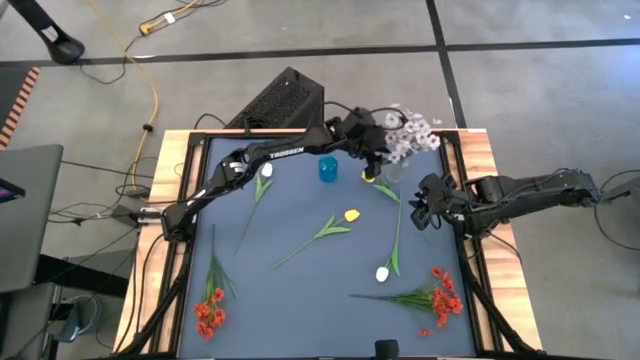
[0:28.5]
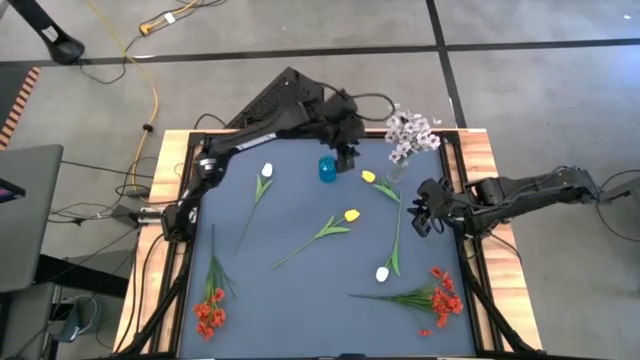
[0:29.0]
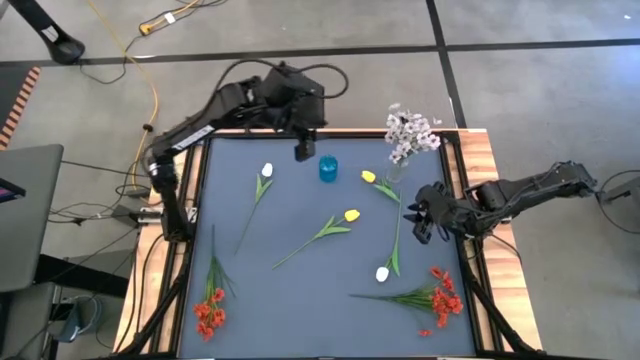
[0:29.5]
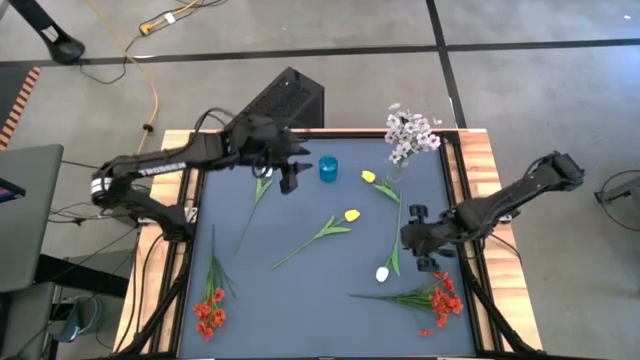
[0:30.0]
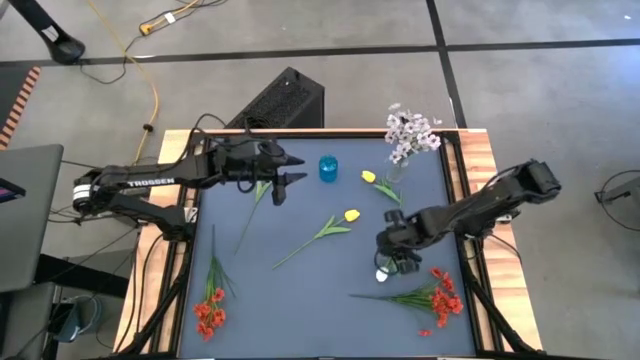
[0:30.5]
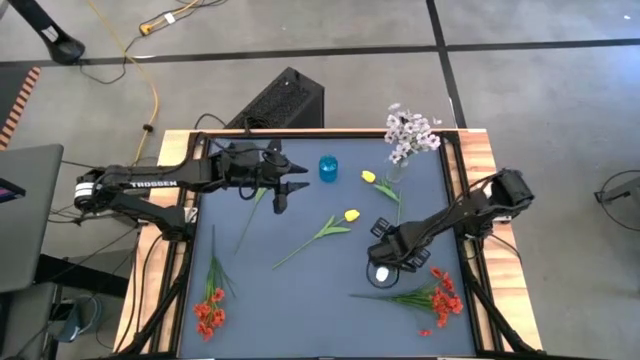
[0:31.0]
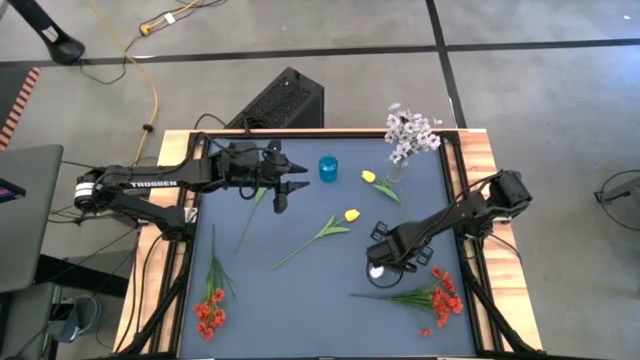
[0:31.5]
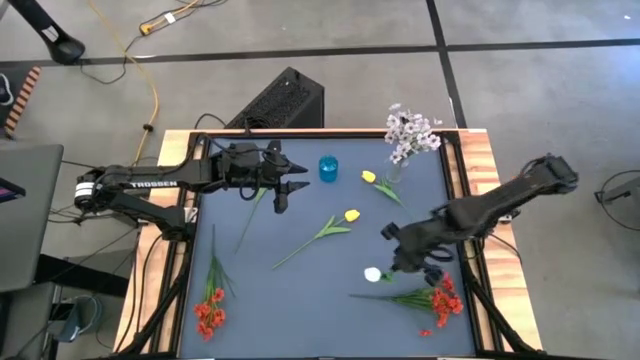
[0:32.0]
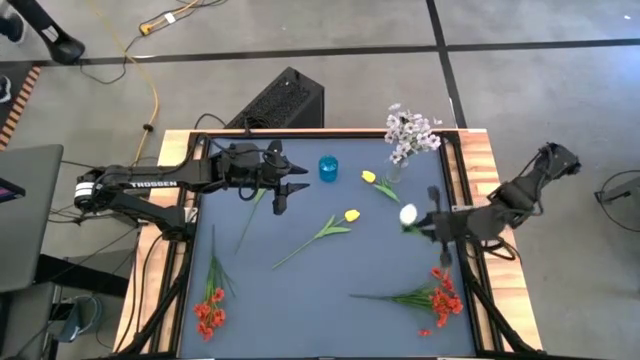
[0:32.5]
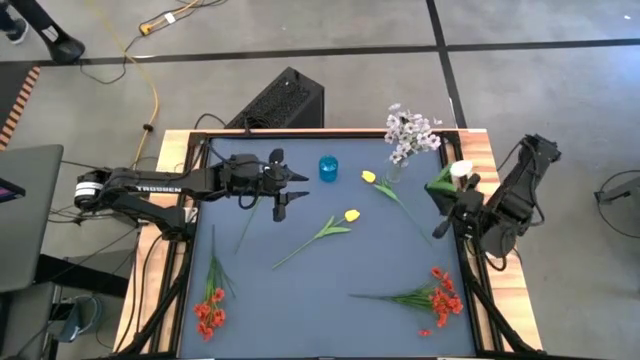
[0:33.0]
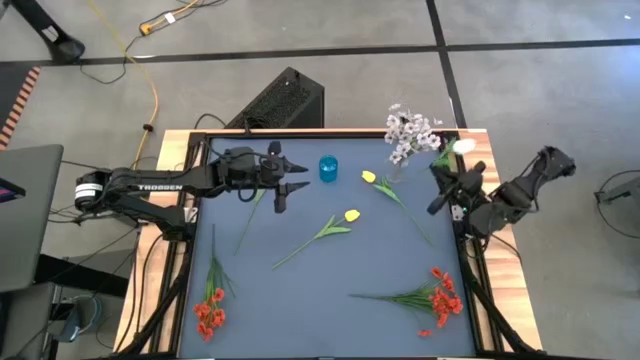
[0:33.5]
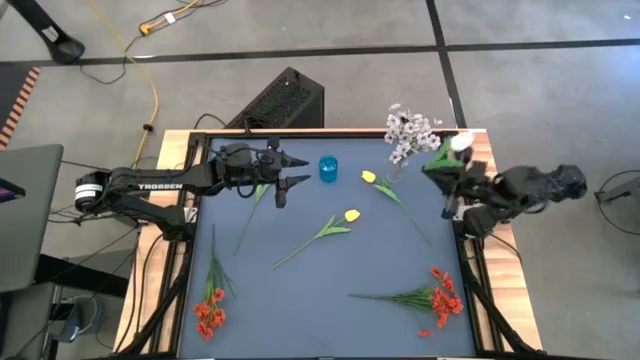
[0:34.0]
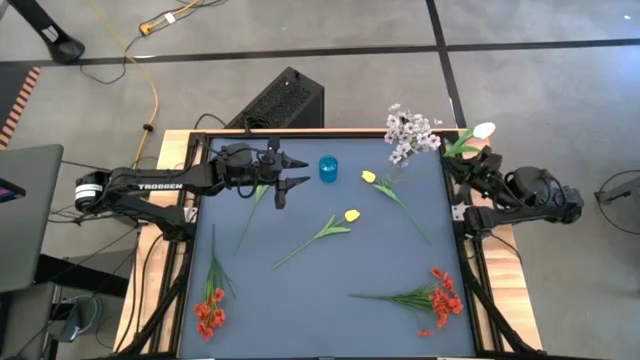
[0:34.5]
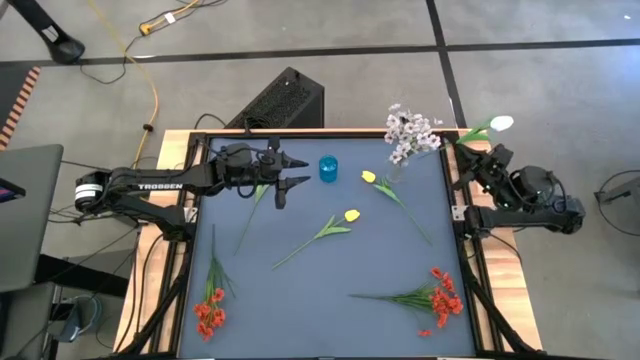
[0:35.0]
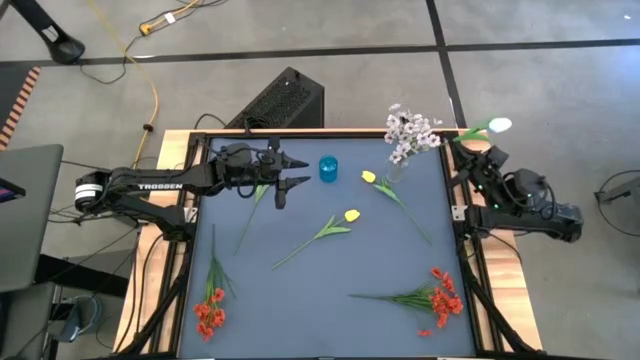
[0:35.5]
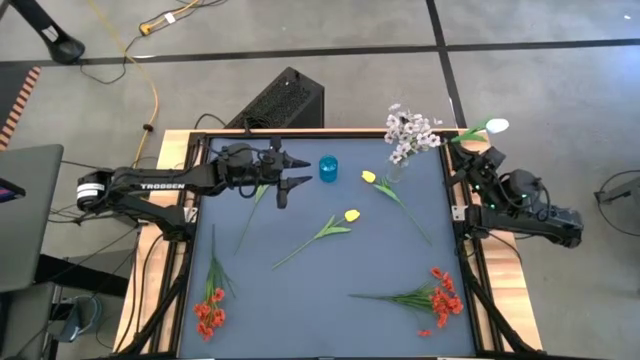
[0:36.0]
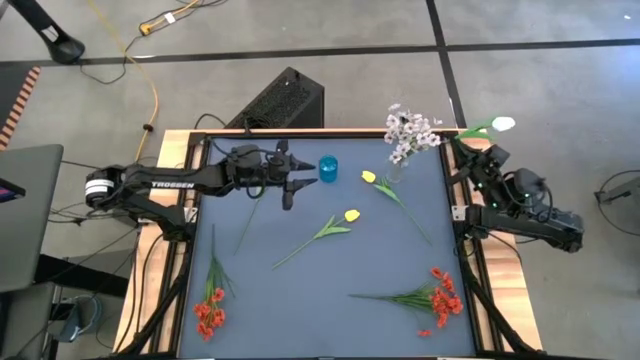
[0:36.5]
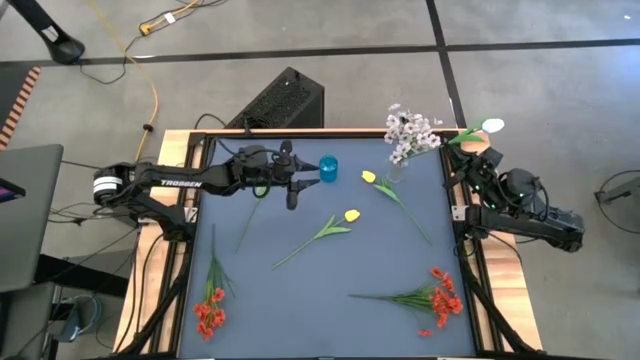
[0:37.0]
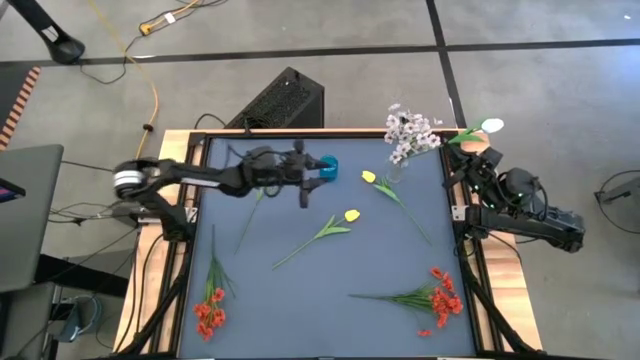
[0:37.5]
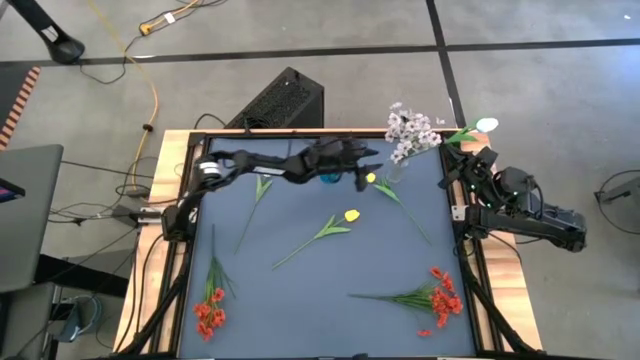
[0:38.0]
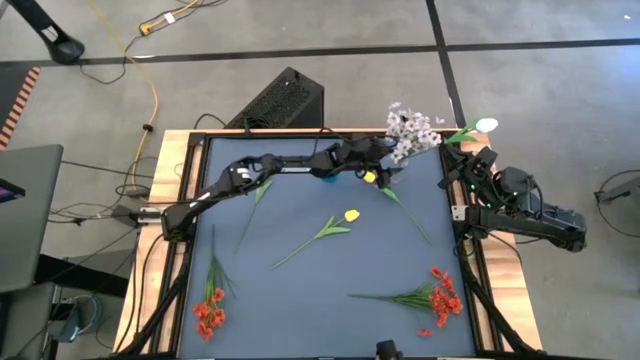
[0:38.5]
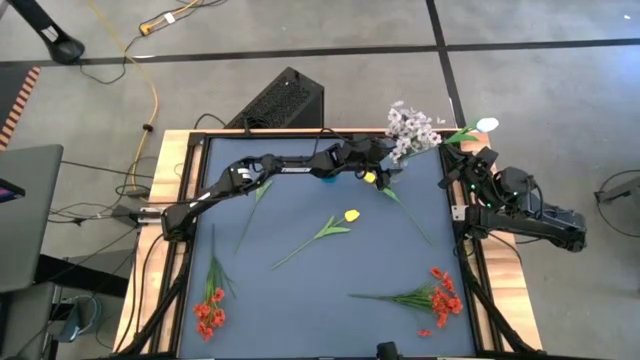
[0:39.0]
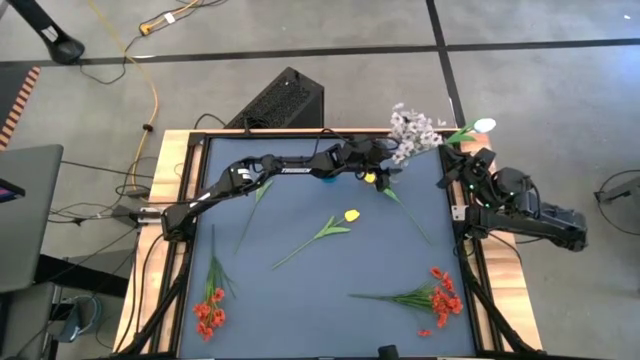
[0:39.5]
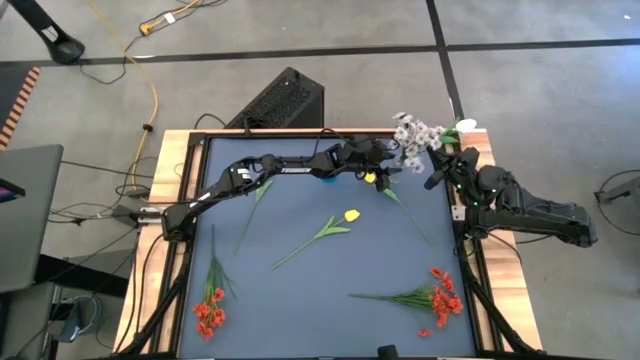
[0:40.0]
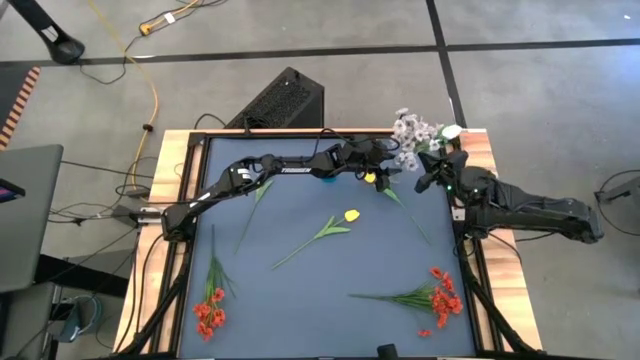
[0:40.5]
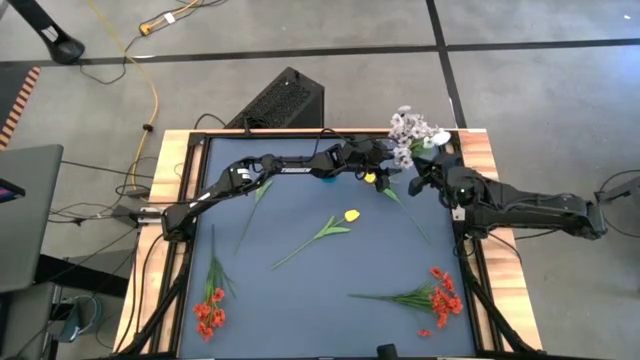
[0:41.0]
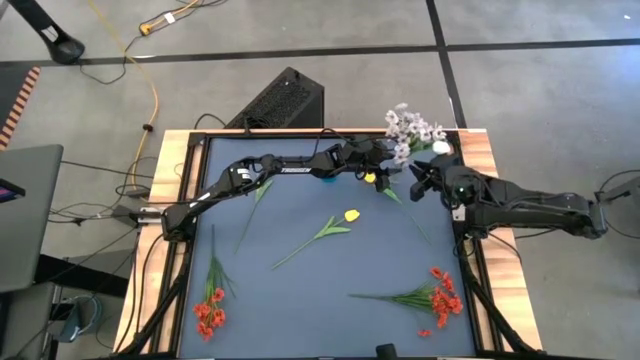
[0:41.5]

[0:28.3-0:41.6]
Task: Sort flowers into vase by color
Put the bottom white flower into the transparent vase

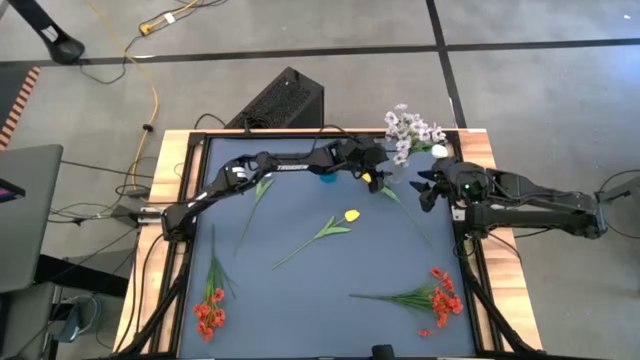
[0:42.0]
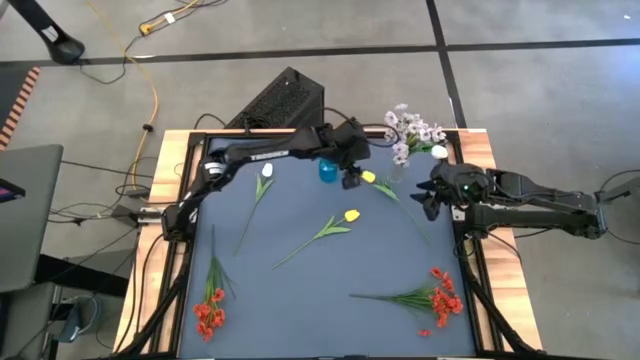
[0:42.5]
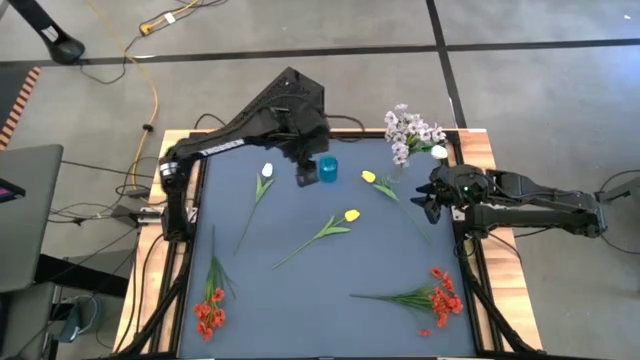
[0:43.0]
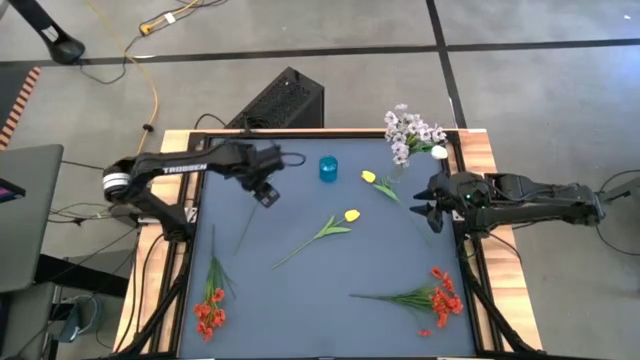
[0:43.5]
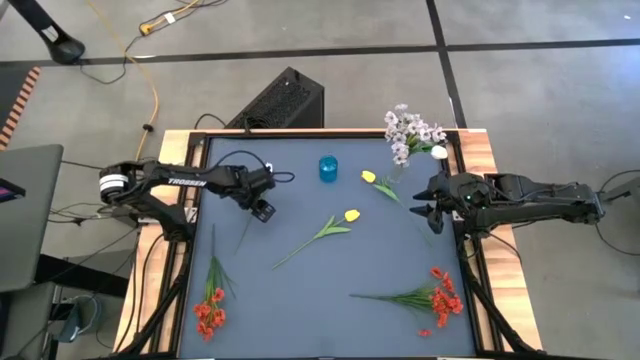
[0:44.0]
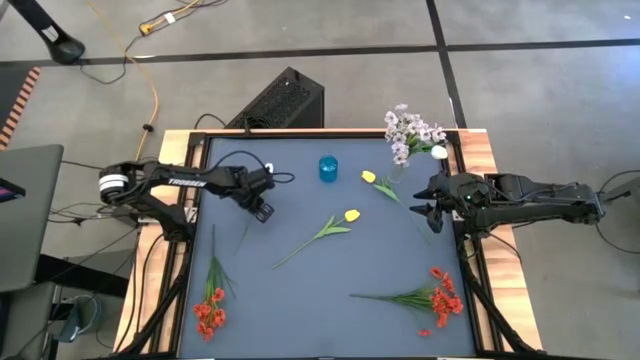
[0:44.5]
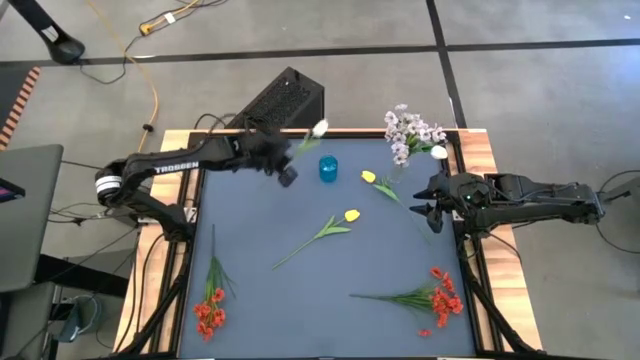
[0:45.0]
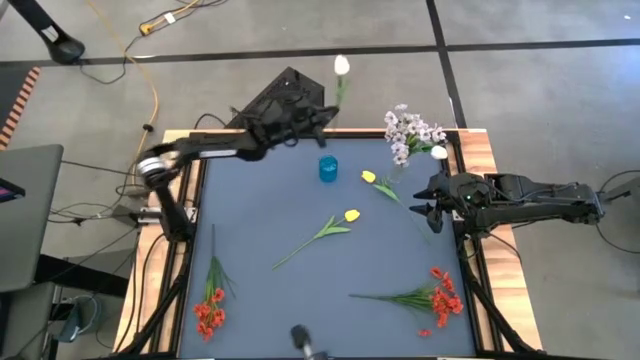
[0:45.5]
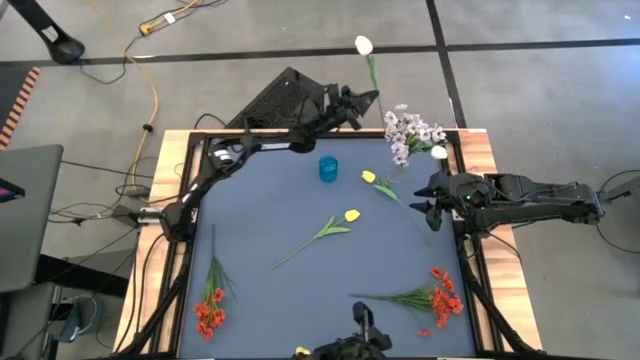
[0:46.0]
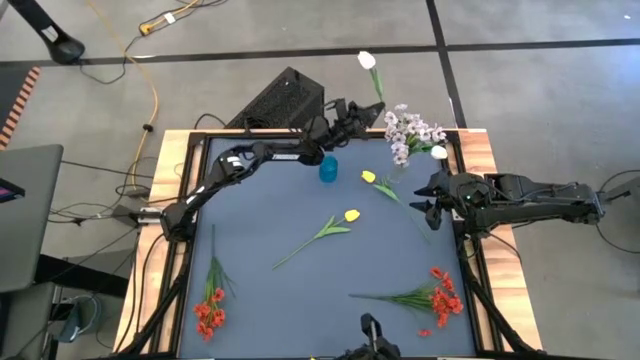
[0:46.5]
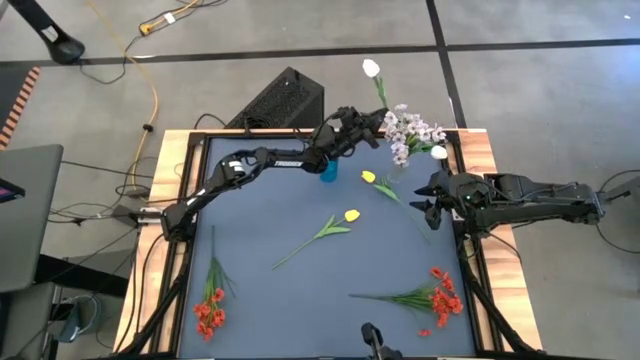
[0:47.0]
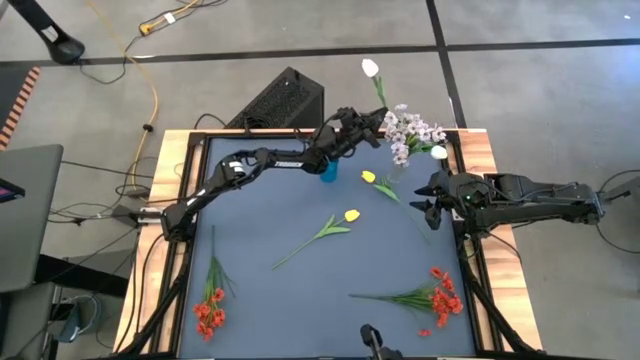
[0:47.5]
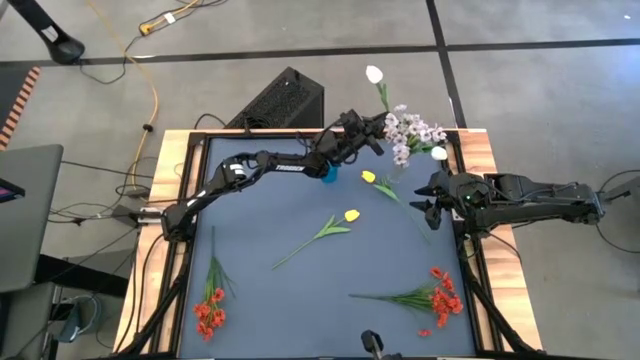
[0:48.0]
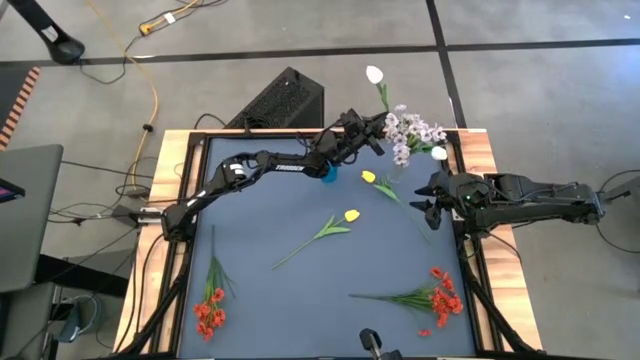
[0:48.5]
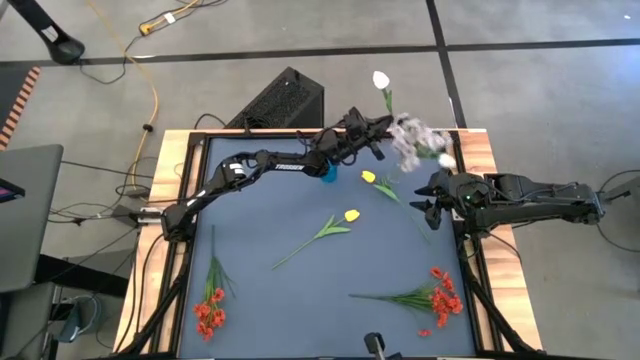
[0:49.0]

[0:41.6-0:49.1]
Put the white flower into the transparent vase
